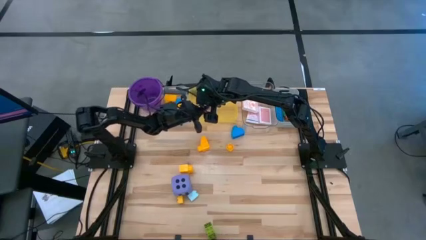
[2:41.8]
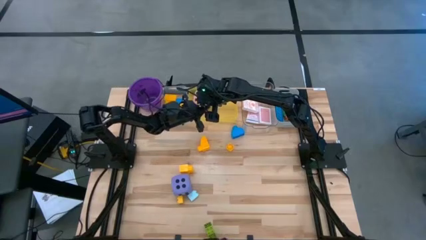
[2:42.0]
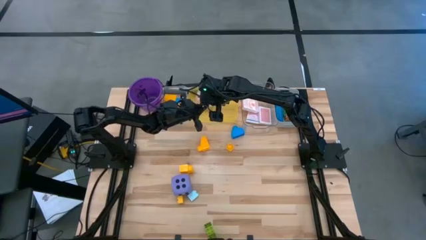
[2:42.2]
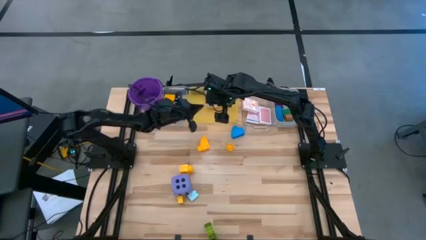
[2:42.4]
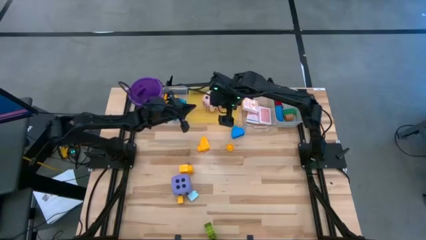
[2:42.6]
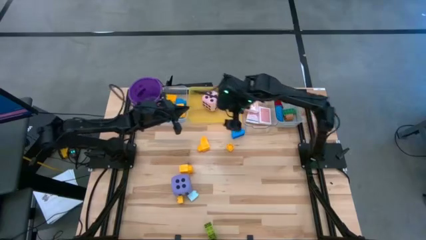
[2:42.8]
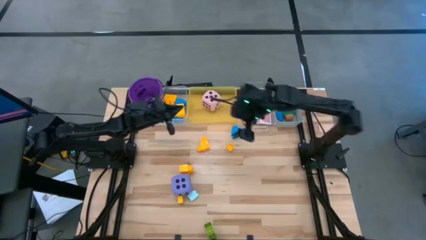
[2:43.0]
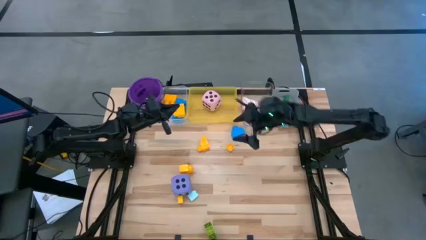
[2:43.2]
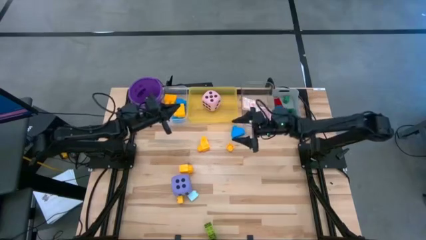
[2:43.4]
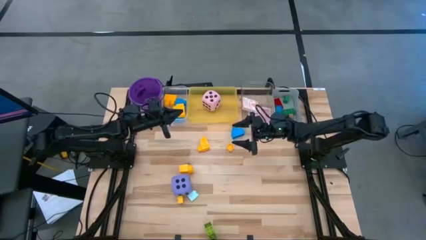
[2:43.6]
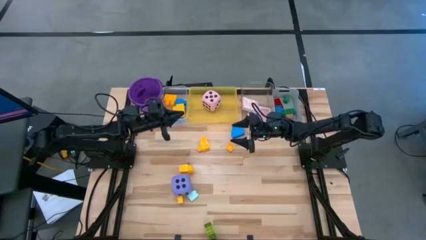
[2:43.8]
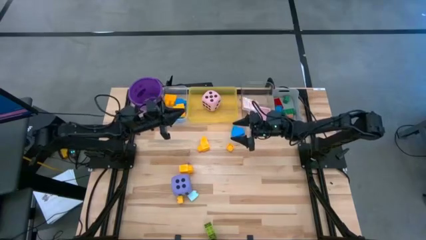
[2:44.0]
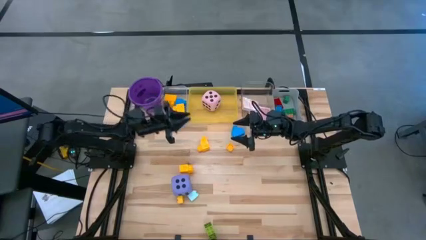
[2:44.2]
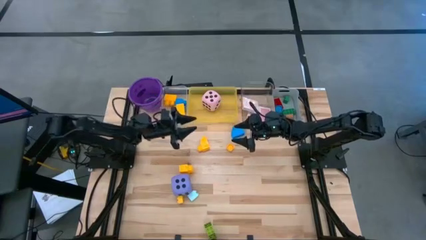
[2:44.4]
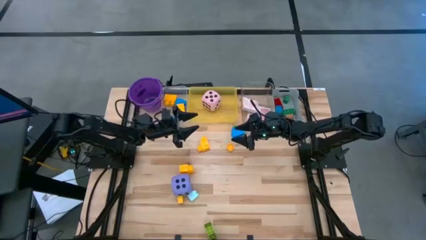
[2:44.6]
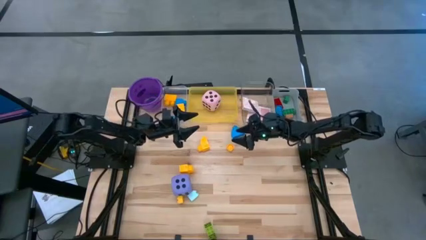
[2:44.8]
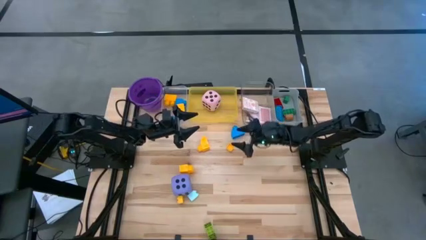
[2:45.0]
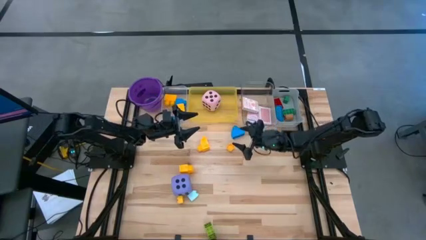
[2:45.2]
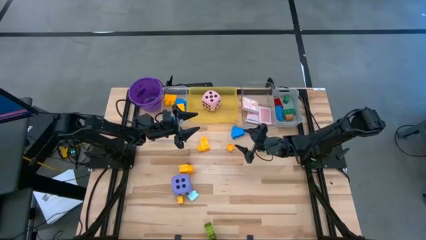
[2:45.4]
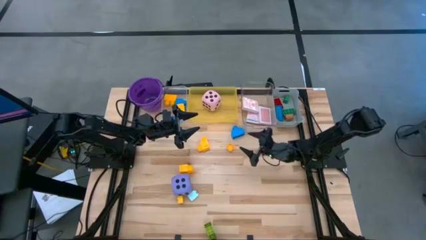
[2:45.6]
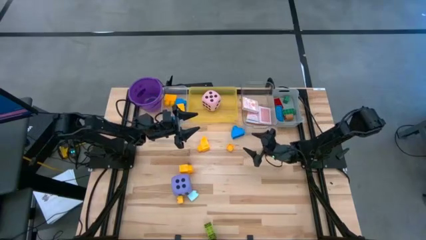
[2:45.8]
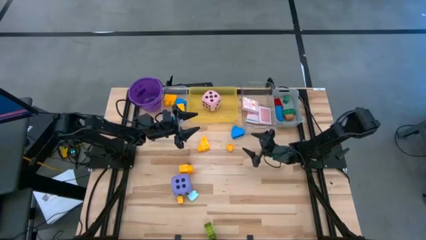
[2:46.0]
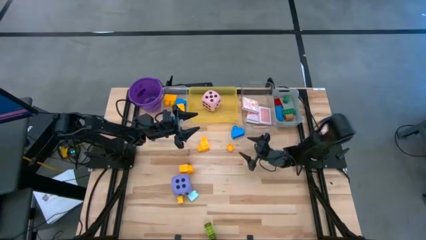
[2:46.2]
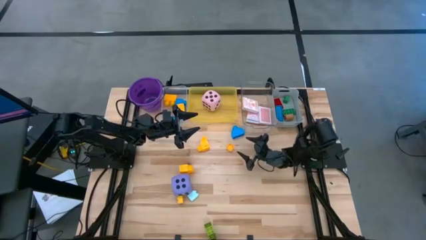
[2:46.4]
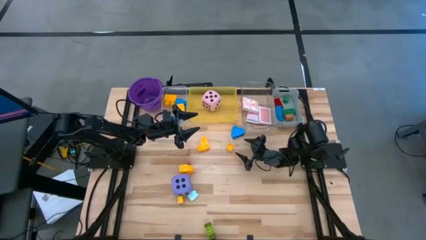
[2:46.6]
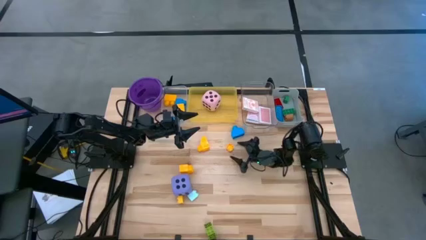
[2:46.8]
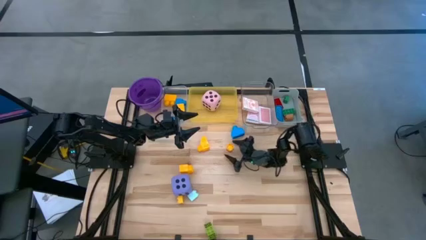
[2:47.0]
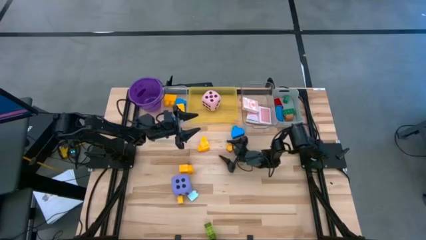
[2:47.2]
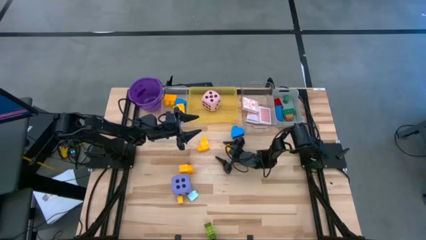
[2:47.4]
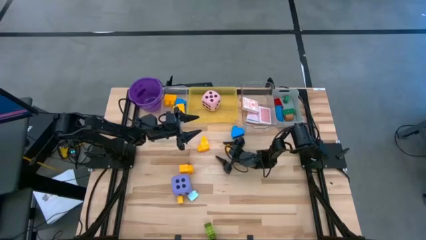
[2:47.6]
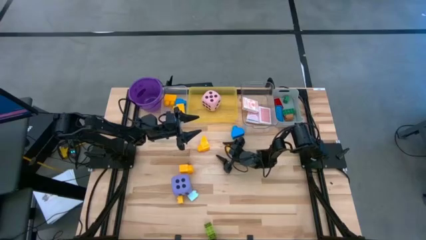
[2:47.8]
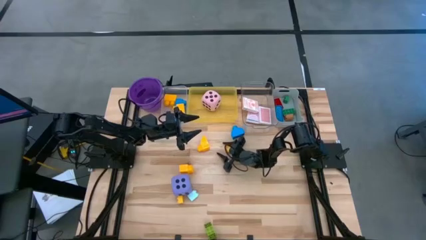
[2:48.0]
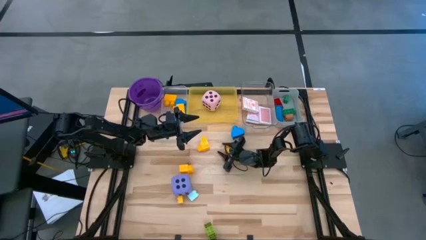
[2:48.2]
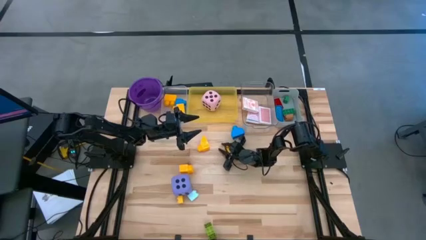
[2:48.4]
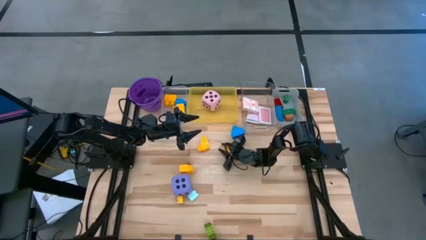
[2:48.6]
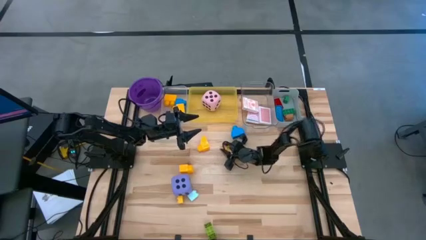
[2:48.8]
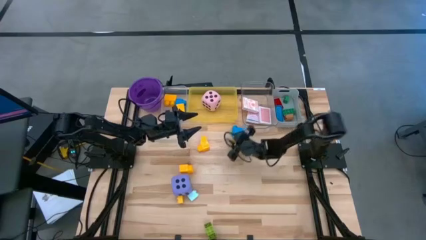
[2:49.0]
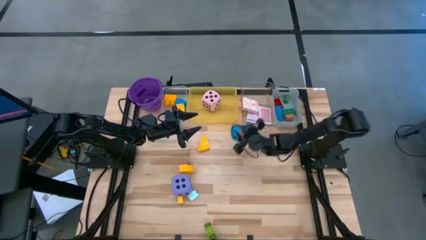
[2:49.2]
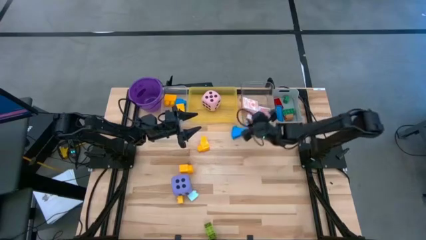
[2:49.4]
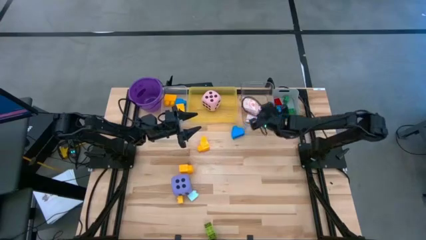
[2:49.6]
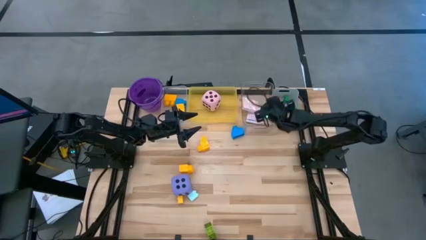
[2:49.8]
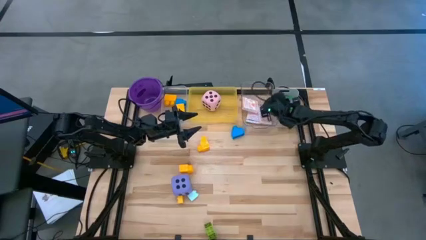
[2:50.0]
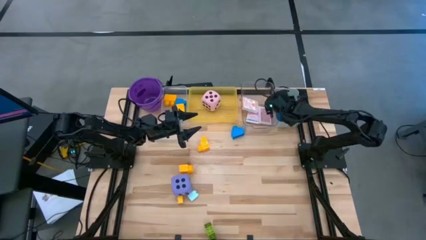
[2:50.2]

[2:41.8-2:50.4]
Task: Pick & Place Toys
Put the top small yellow game piece into the gray bin

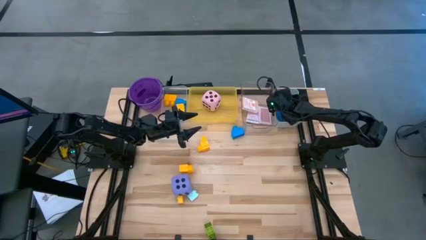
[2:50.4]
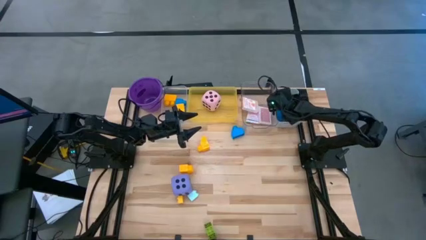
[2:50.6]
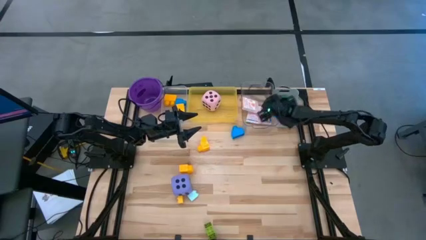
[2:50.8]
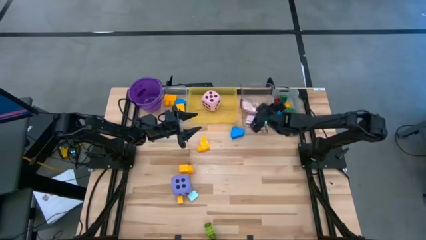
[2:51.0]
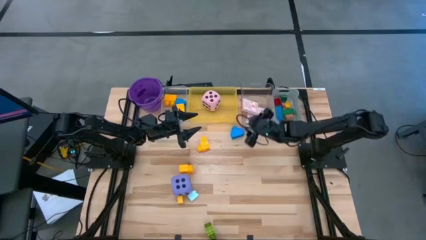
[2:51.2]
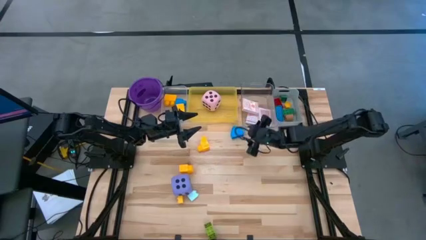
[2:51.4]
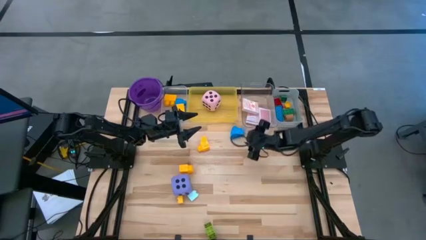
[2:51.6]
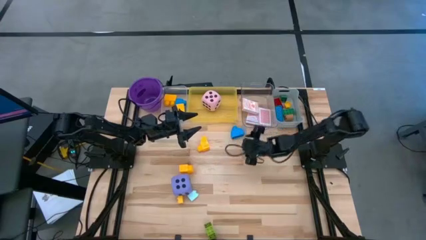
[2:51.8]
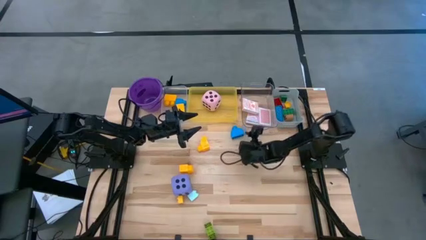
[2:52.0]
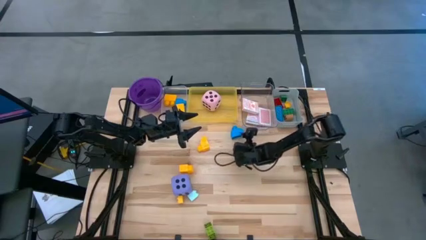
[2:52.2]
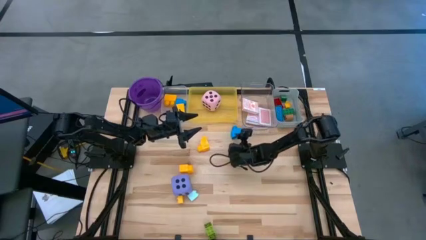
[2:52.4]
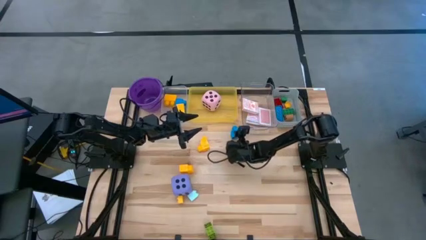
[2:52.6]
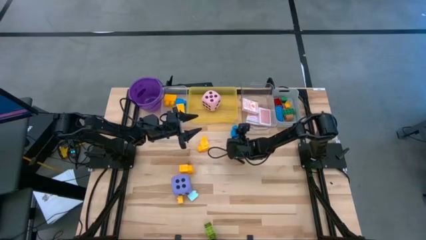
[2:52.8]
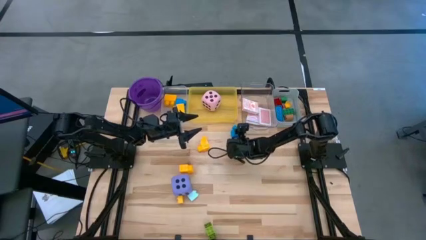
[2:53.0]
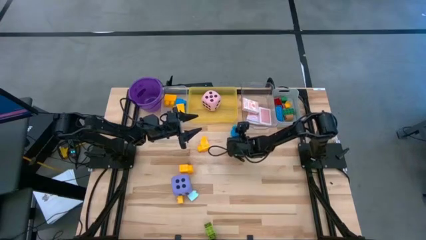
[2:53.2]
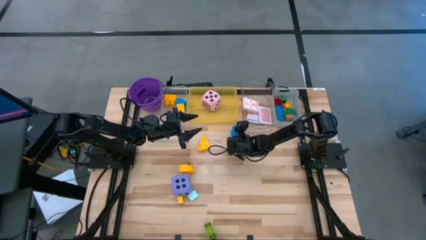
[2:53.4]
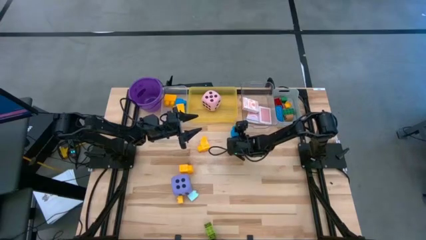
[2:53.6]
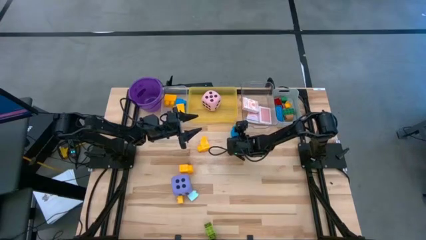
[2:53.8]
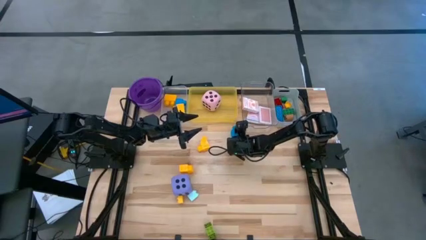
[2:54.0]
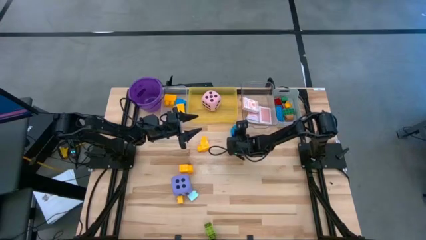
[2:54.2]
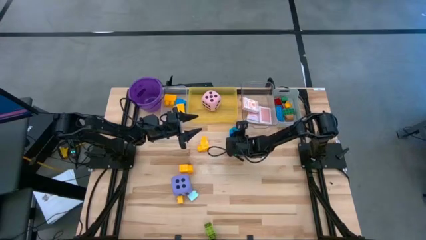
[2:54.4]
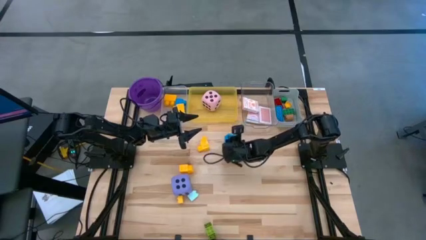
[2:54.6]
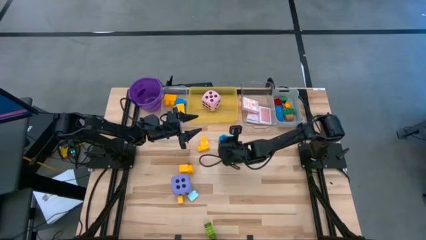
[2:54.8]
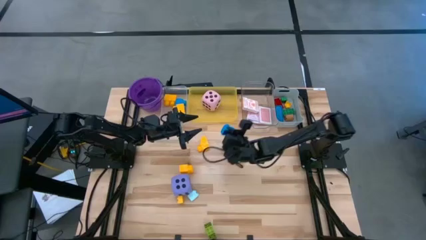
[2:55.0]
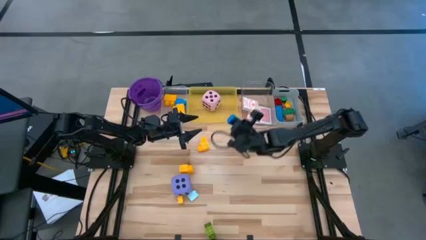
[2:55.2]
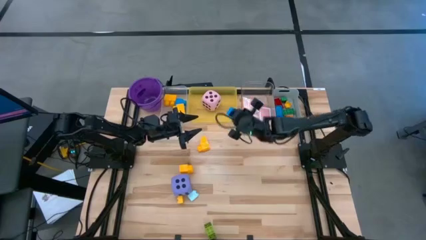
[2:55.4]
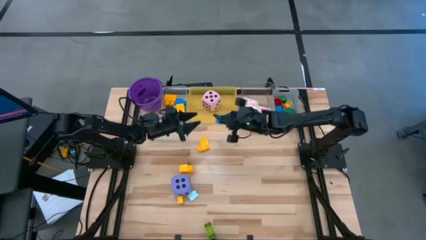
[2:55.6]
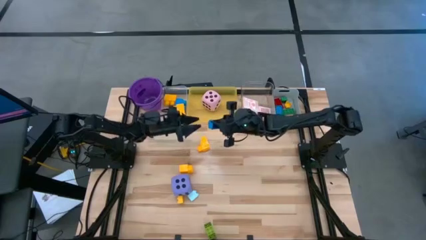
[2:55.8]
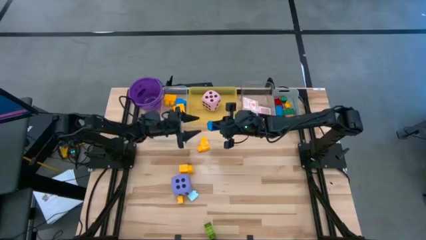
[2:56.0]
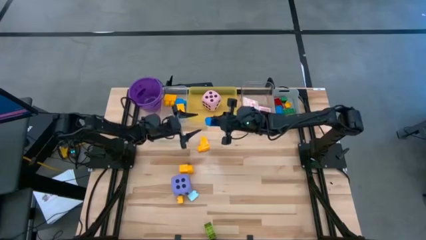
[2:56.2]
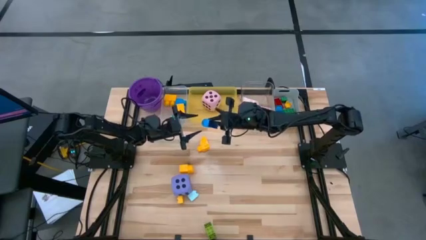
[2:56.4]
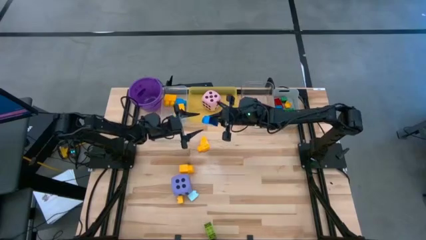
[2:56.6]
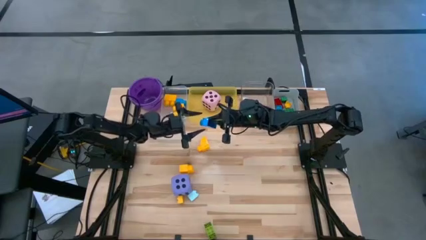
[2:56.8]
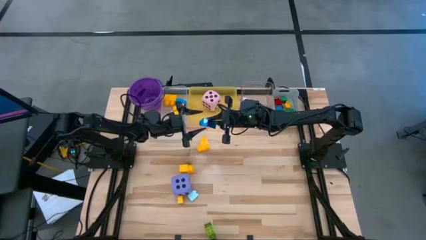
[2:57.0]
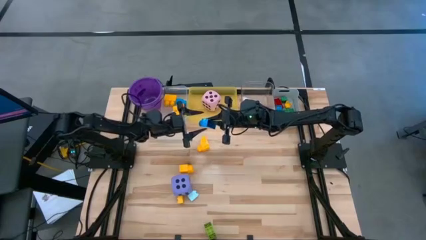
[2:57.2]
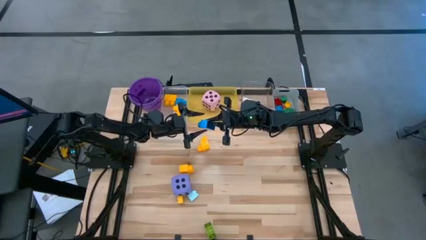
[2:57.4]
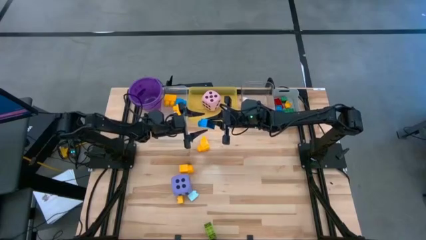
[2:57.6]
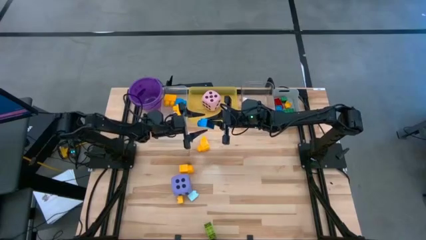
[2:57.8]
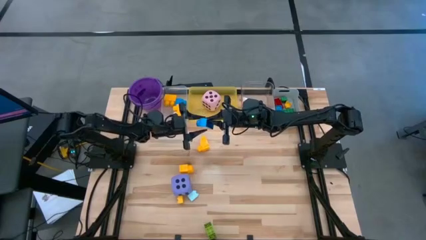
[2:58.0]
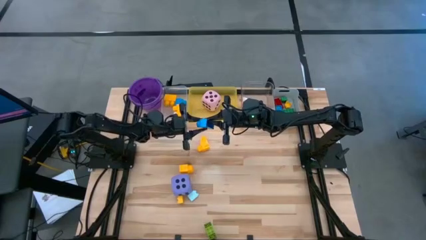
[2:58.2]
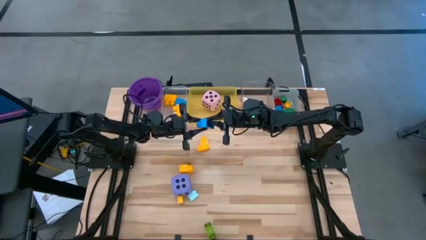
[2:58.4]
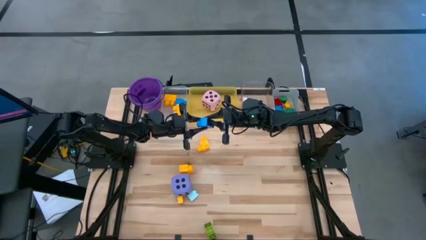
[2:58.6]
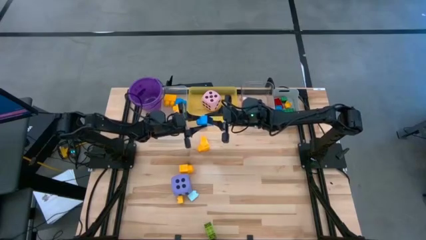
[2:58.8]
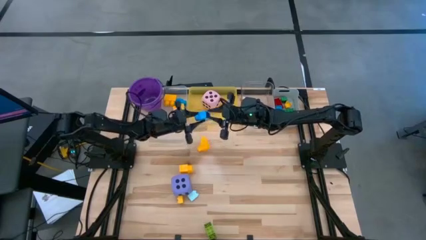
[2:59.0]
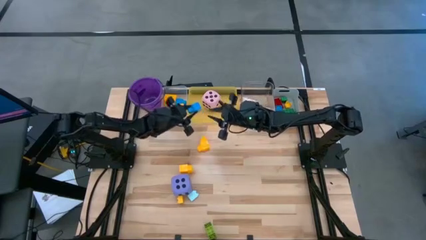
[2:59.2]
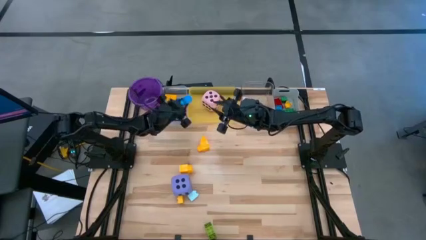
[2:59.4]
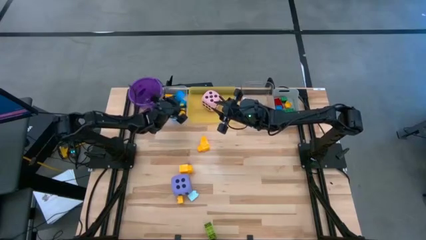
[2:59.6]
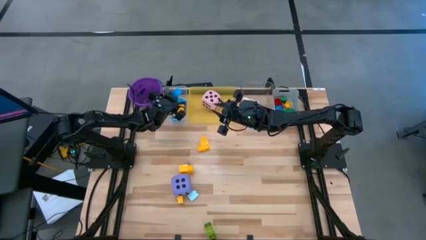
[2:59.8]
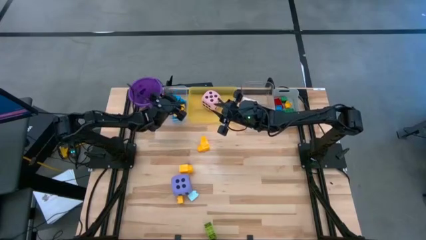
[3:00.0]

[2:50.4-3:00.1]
Put the large blue game piece into the white transparent bin
